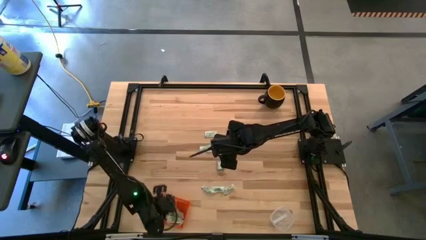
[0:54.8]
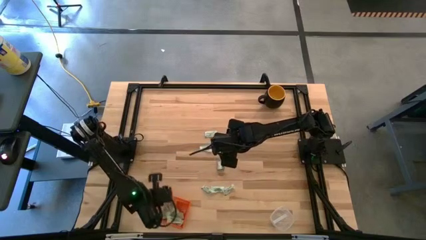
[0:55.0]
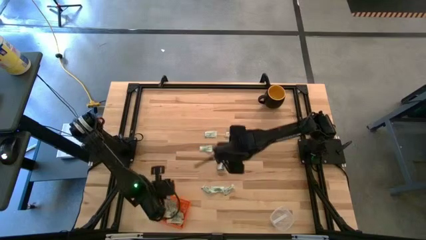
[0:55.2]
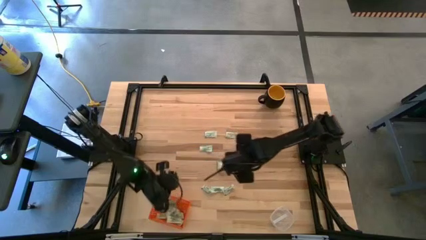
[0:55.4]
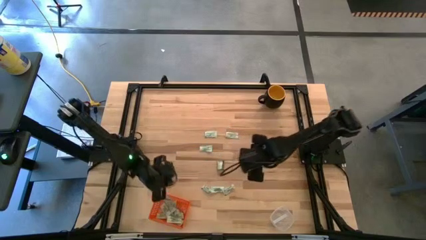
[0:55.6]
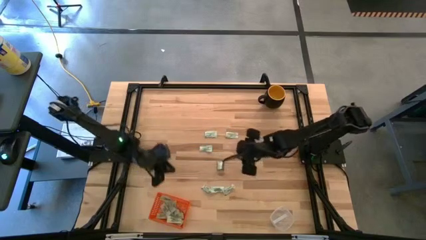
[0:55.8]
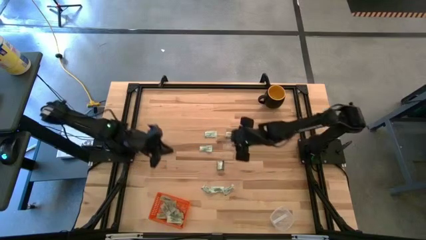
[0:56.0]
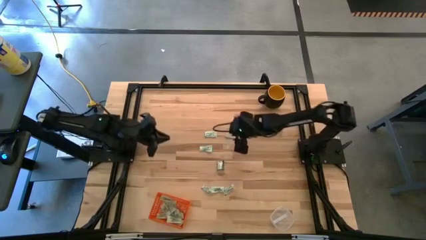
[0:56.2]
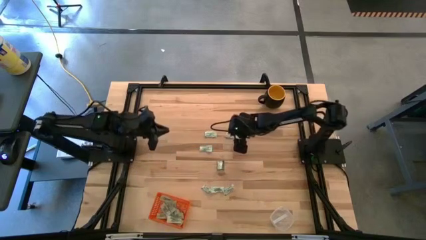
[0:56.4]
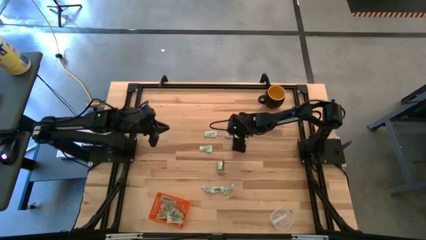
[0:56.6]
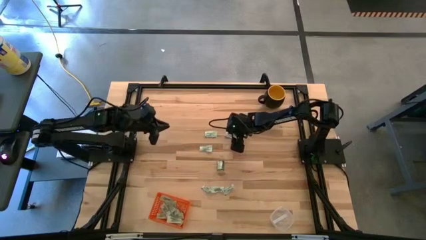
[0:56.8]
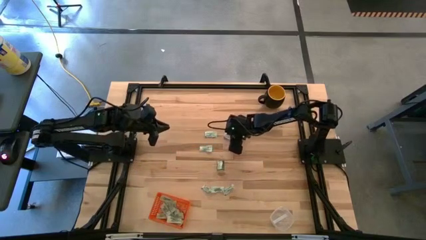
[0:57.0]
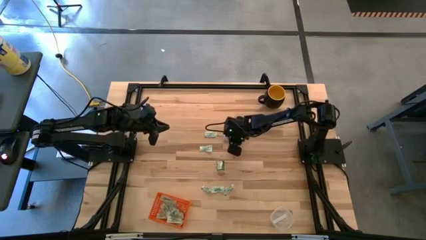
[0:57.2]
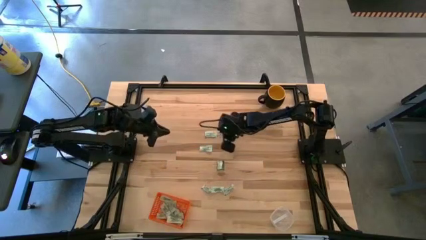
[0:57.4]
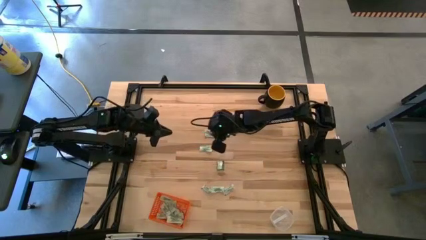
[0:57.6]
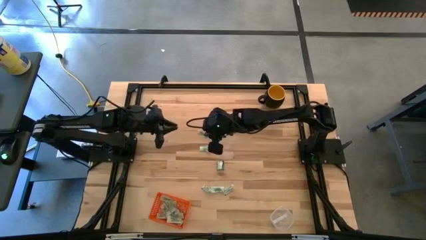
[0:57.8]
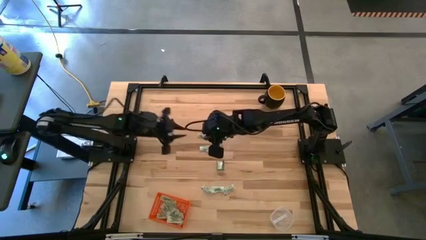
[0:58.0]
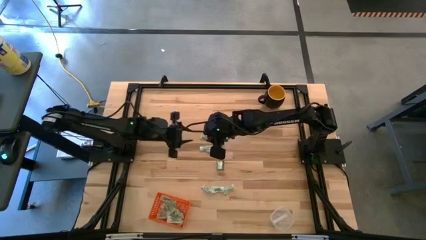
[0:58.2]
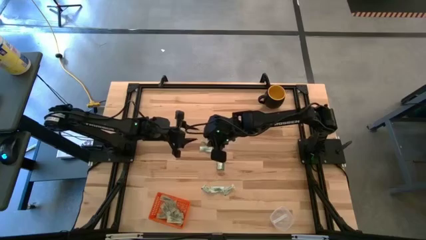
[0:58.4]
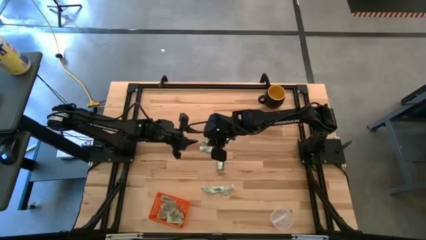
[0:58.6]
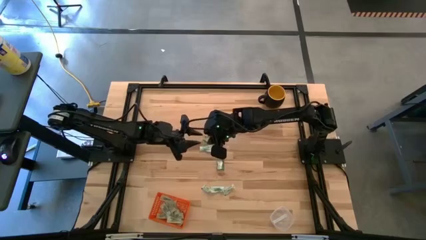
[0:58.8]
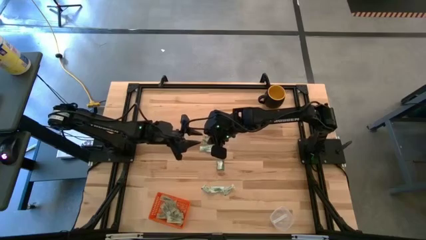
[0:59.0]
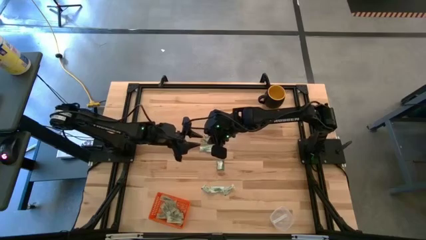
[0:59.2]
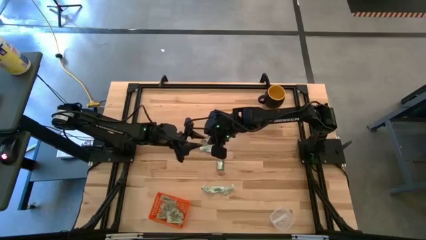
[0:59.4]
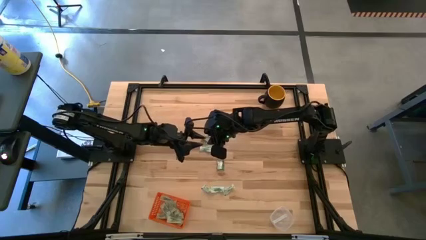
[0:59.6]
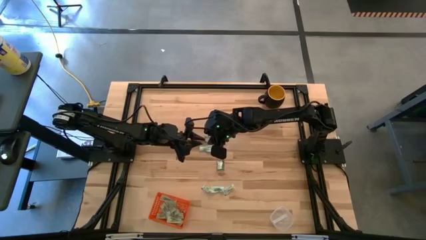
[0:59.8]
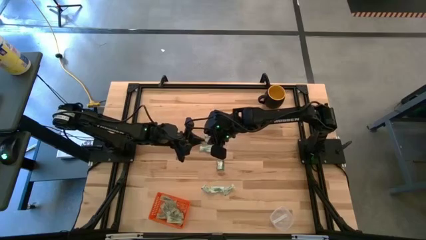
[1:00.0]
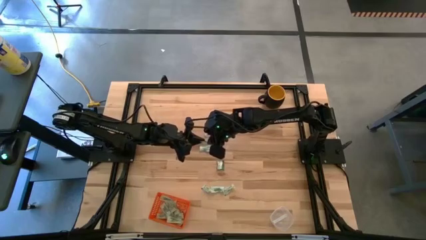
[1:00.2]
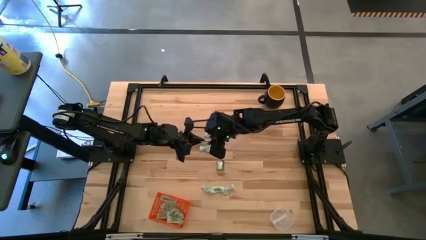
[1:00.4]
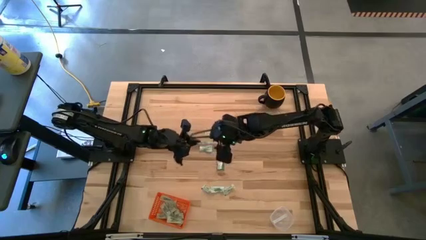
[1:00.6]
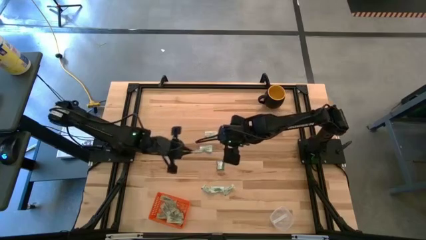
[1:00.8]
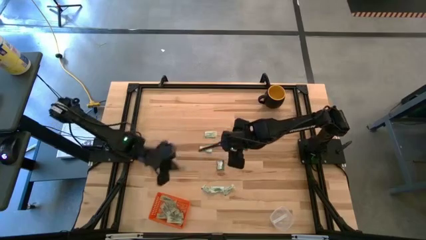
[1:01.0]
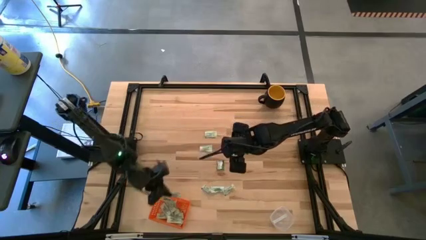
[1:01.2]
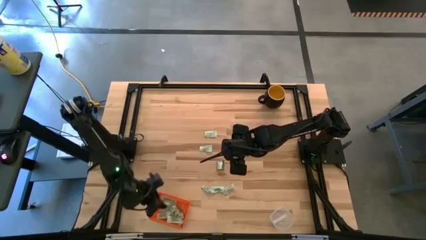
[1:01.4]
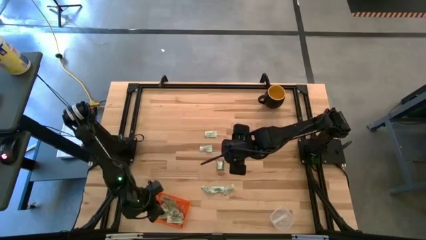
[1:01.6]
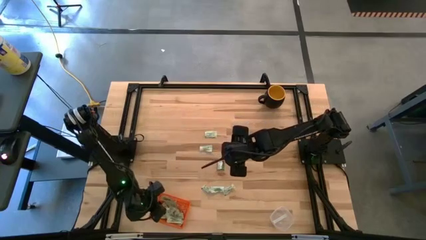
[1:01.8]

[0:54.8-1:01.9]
Task: Pick and place items into bin
Put the white stevia packet into the orange bin

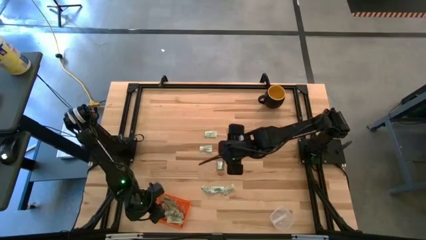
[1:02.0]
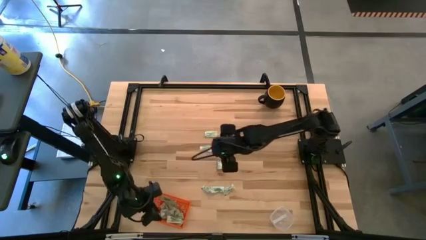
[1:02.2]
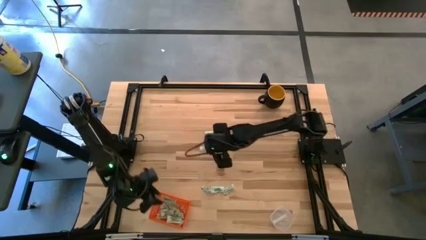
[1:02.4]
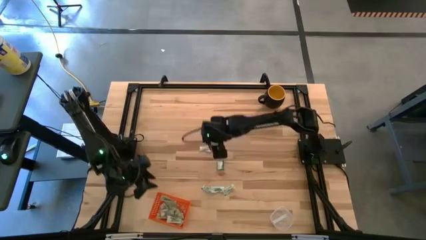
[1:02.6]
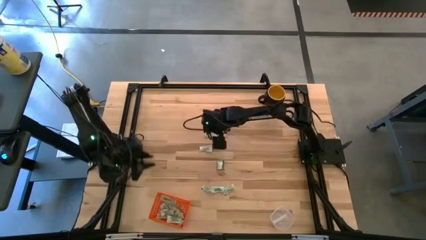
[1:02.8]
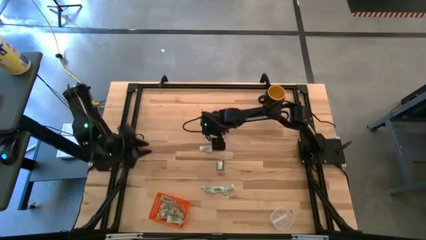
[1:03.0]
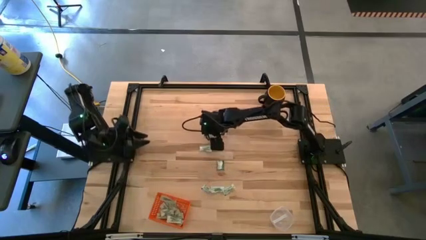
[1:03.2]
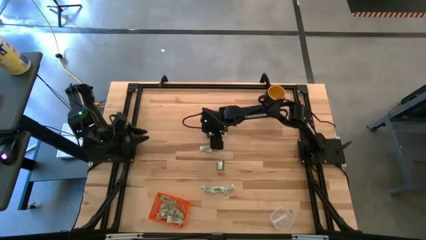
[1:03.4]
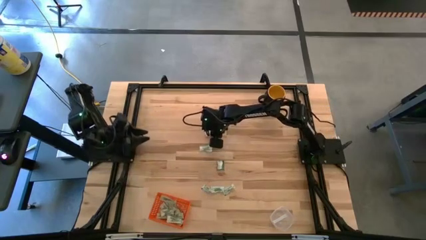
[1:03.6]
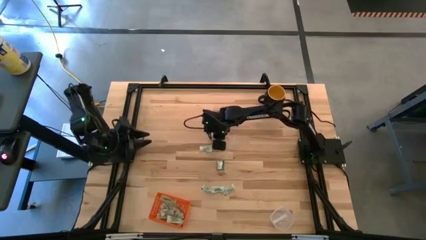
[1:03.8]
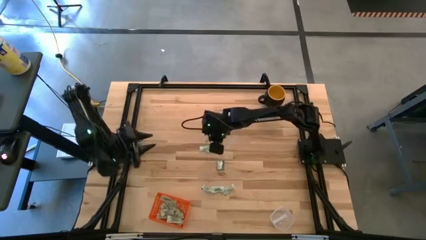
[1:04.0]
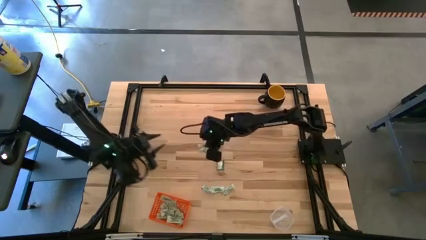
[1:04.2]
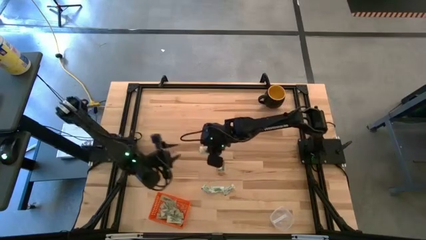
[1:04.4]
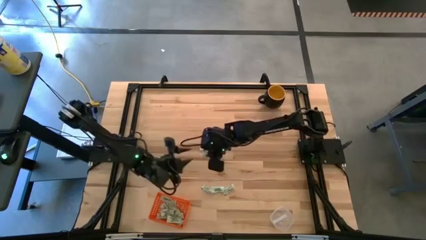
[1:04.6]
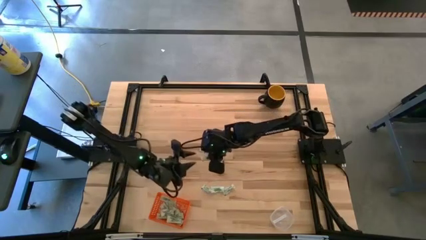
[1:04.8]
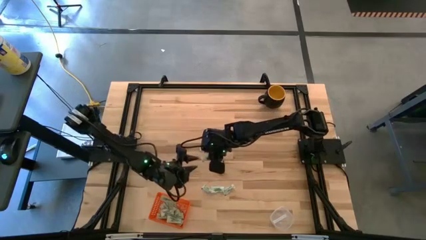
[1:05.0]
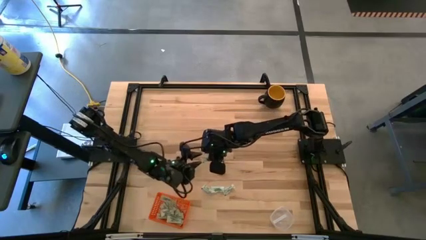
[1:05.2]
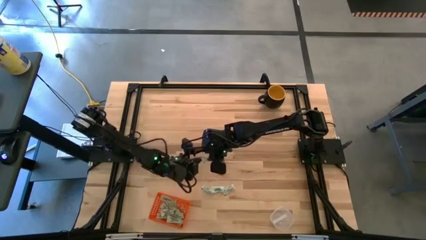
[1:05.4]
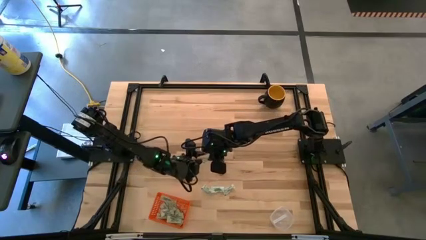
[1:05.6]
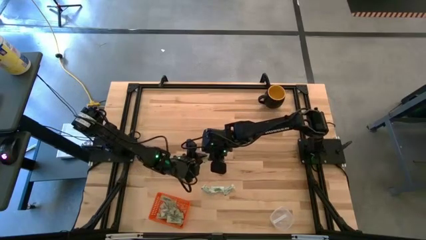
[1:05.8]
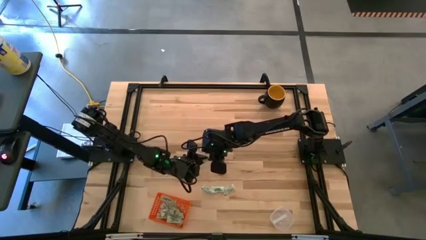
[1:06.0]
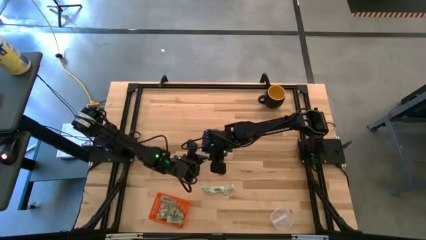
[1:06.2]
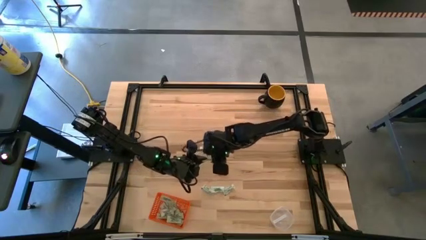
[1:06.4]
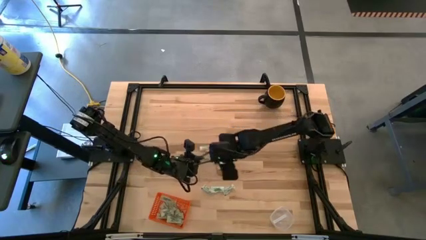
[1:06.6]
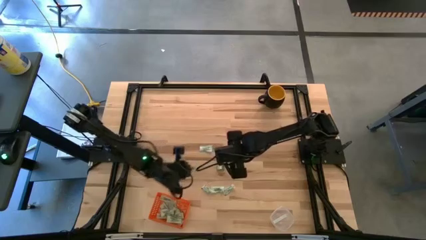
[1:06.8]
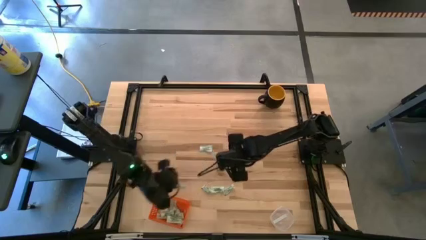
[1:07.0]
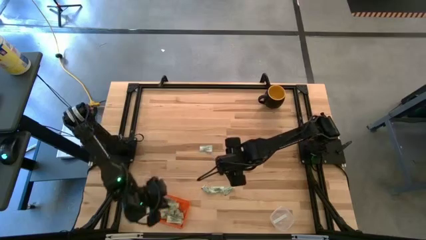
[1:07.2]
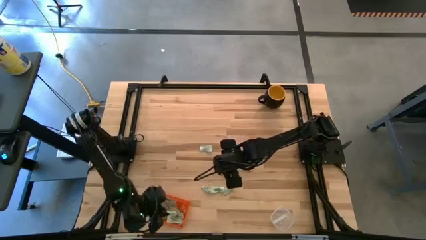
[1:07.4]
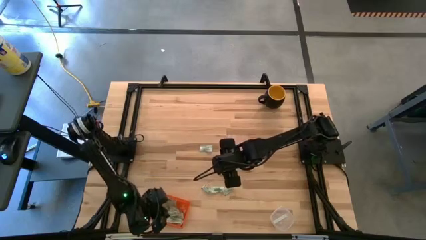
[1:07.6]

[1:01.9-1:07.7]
Put the white stevia packet into the orange bin

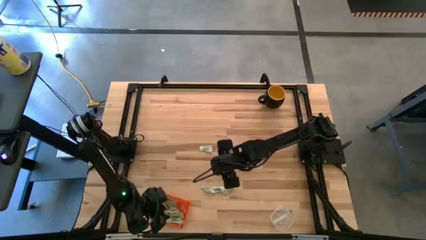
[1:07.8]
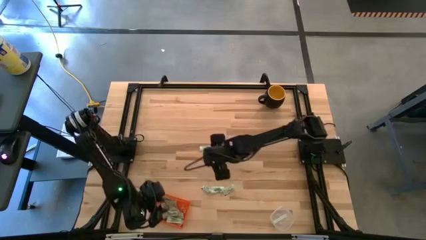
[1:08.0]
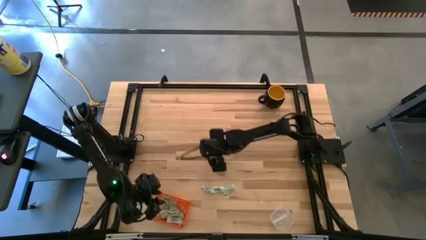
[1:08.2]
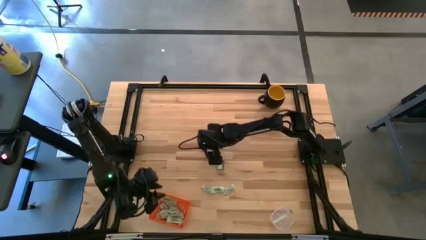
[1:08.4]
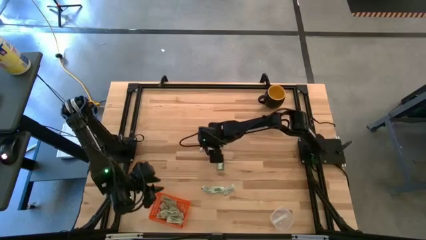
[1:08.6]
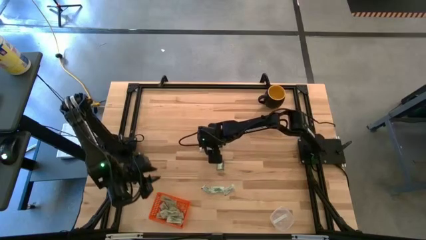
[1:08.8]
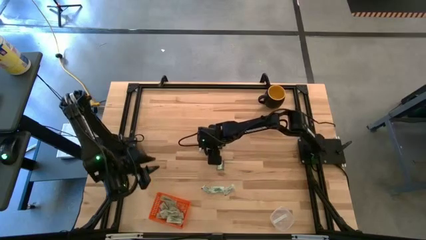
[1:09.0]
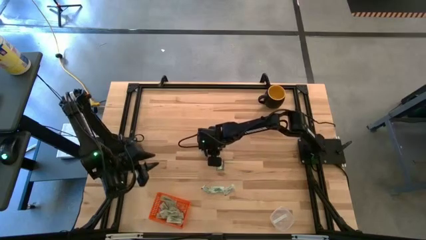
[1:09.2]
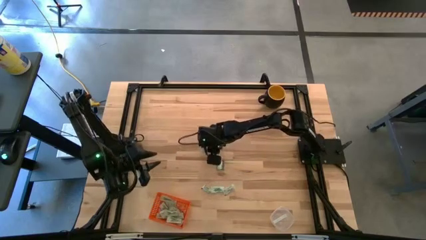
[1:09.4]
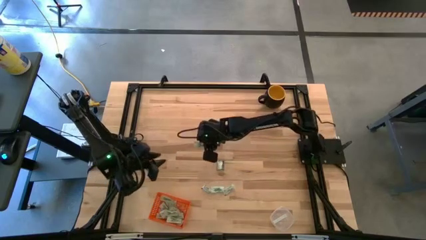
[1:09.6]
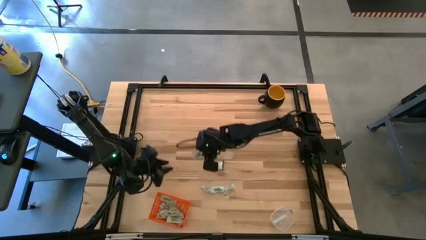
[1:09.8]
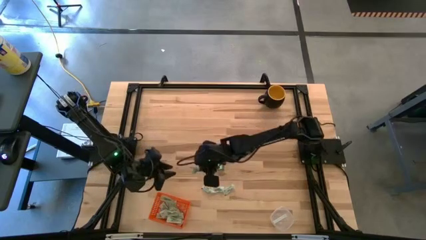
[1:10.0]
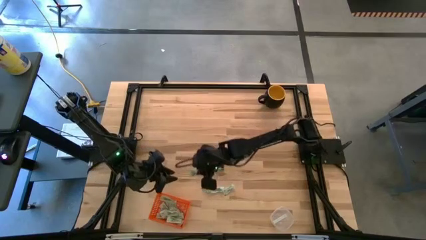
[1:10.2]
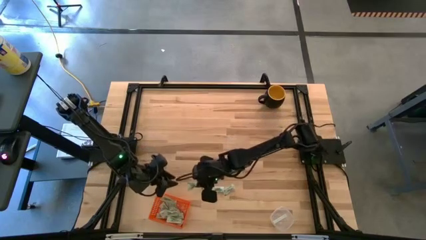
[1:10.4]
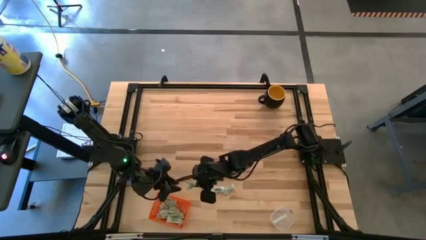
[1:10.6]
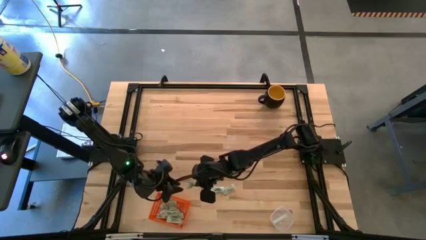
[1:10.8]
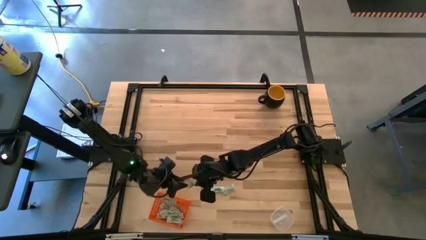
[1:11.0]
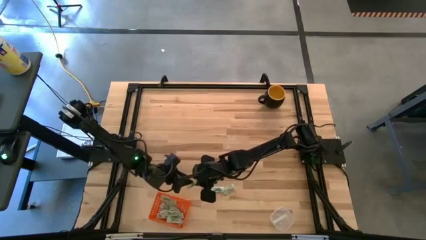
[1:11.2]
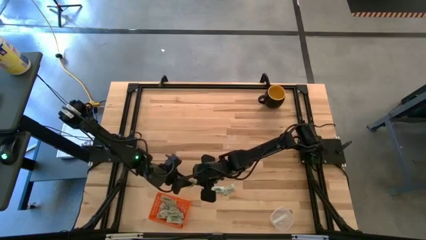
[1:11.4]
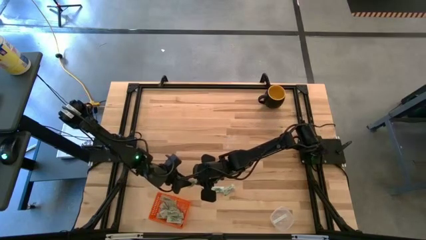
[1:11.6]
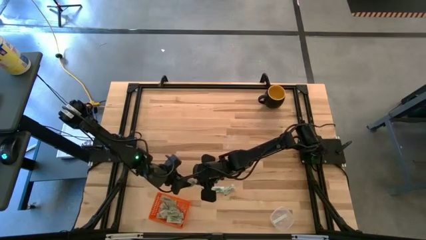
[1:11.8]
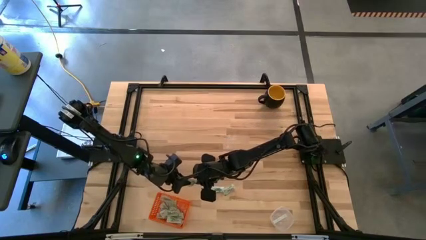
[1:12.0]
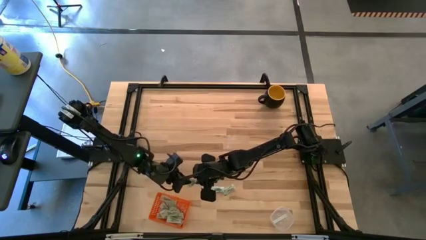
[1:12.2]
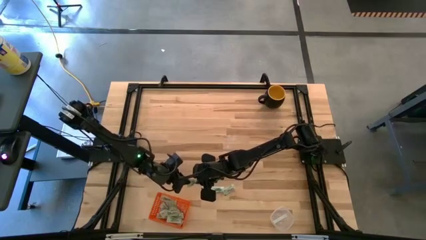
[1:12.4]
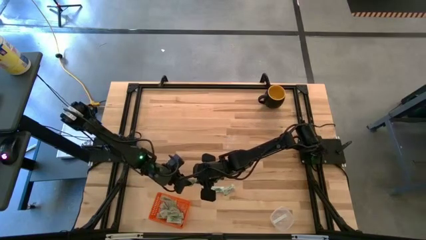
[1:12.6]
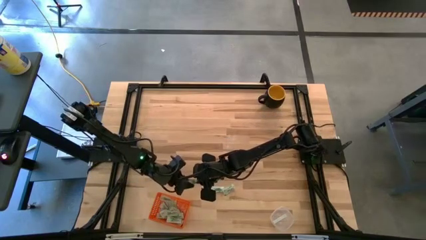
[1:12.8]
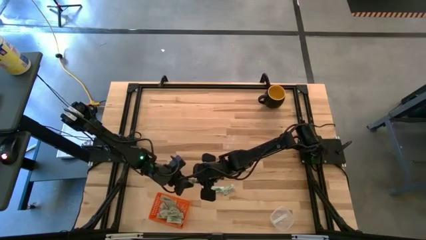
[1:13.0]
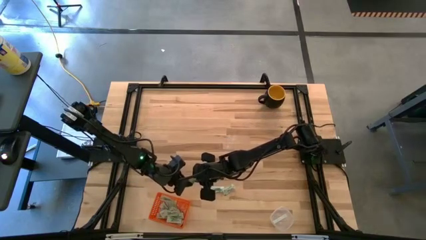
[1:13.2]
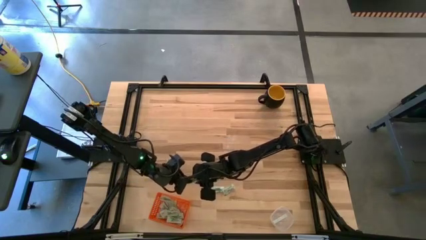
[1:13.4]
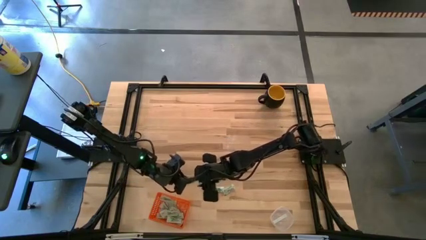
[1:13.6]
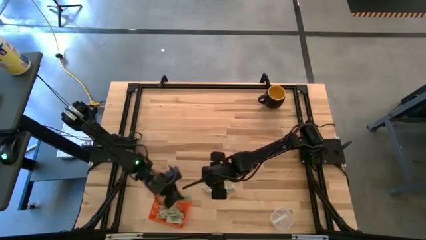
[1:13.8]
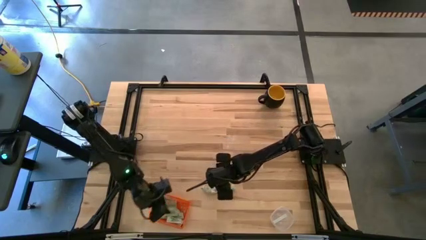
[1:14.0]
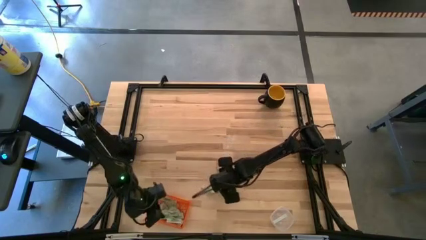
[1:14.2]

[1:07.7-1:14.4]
Put the white stevia packet into the orange bin
